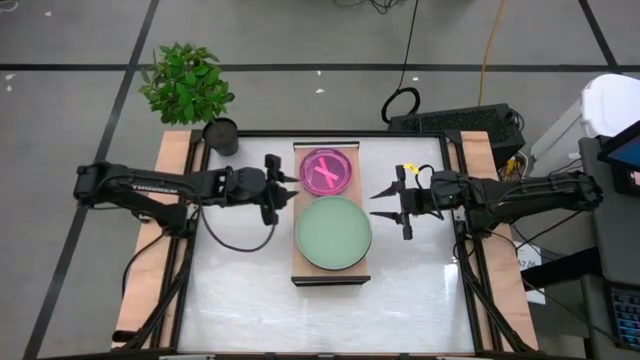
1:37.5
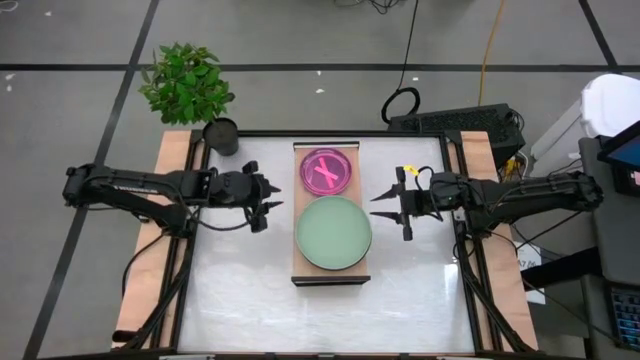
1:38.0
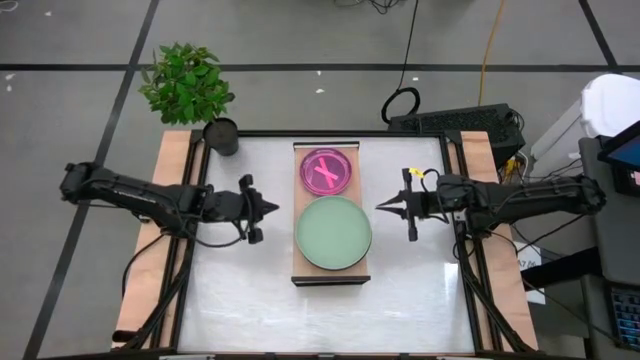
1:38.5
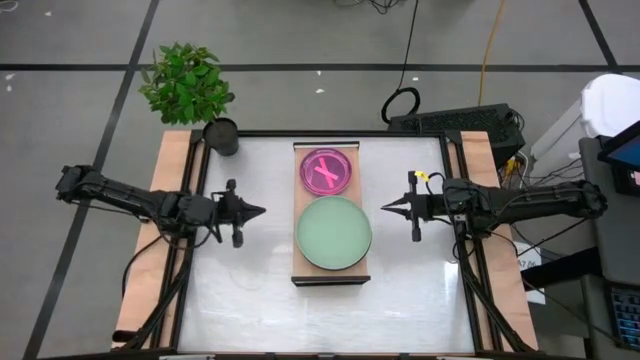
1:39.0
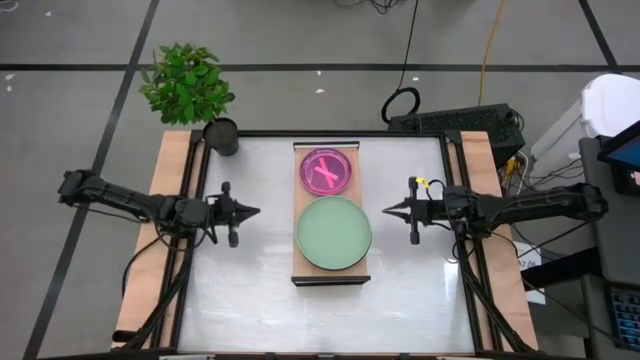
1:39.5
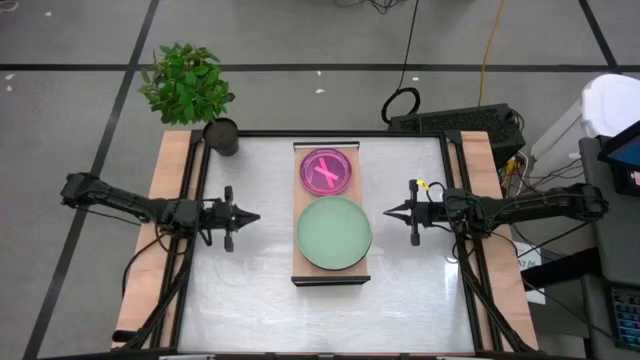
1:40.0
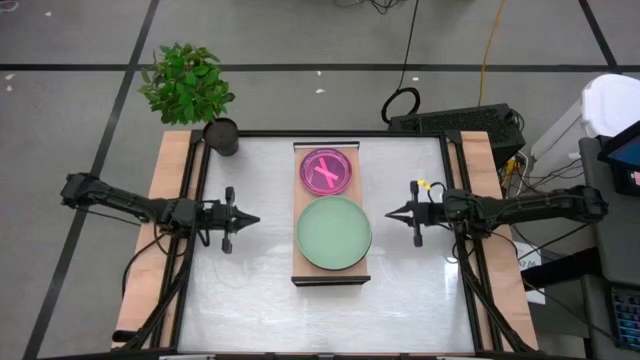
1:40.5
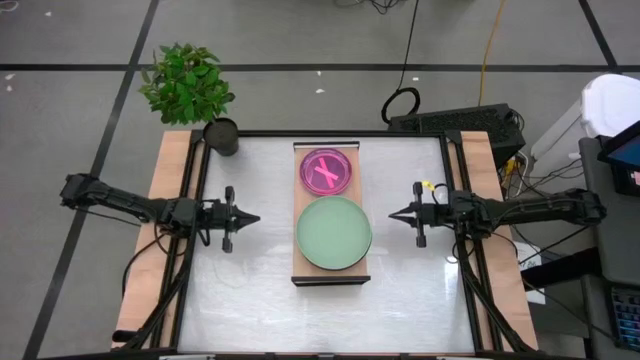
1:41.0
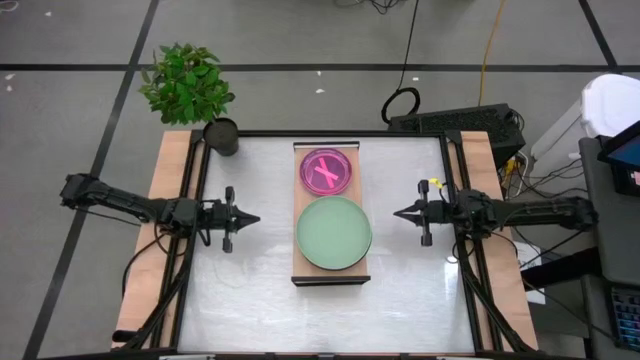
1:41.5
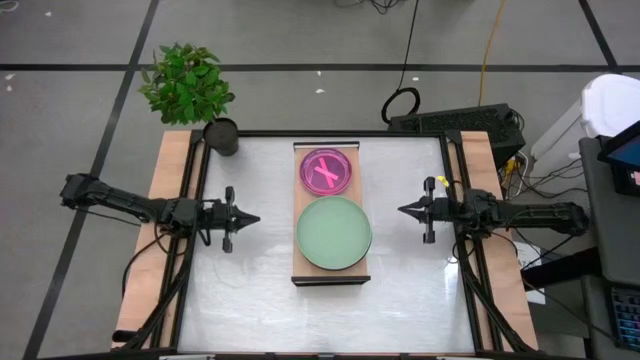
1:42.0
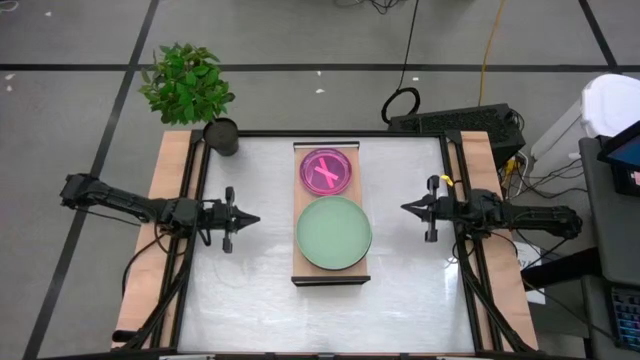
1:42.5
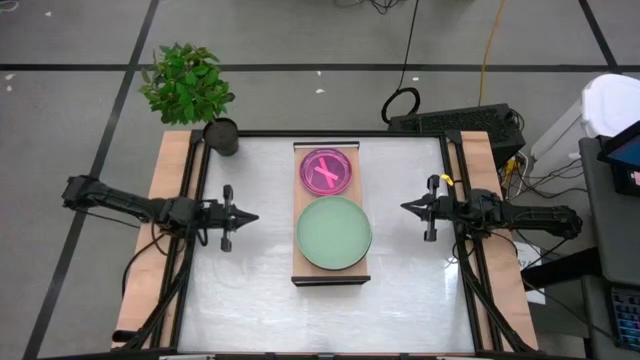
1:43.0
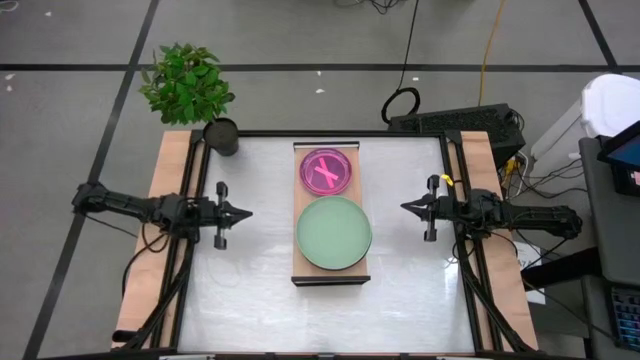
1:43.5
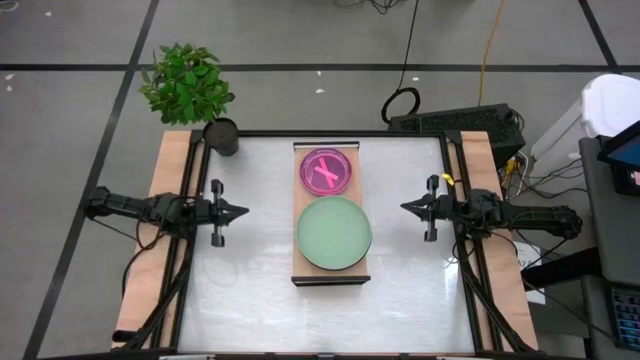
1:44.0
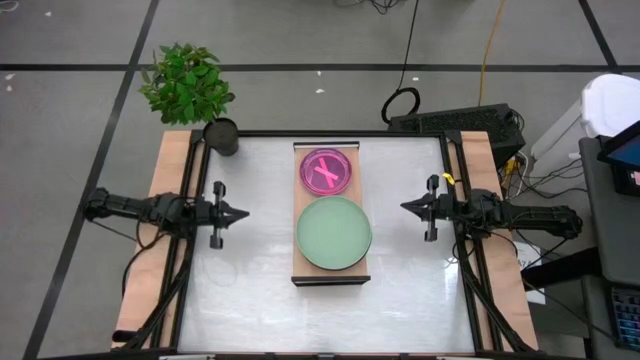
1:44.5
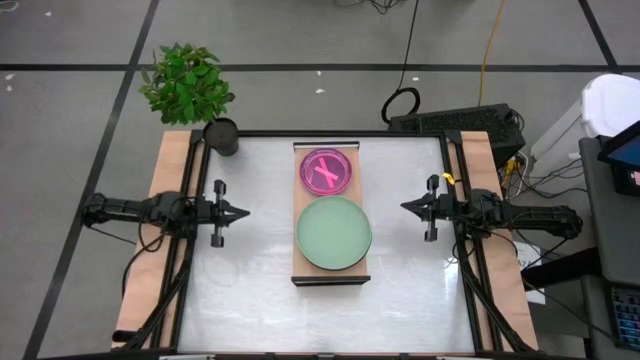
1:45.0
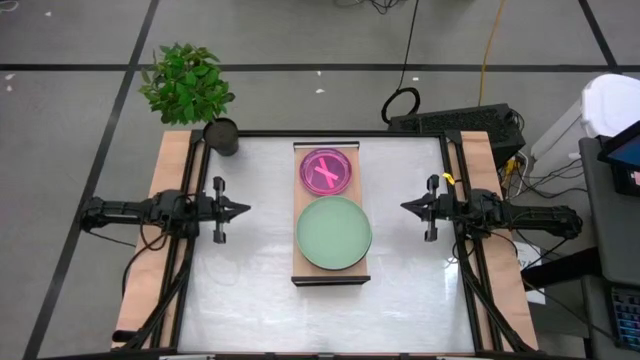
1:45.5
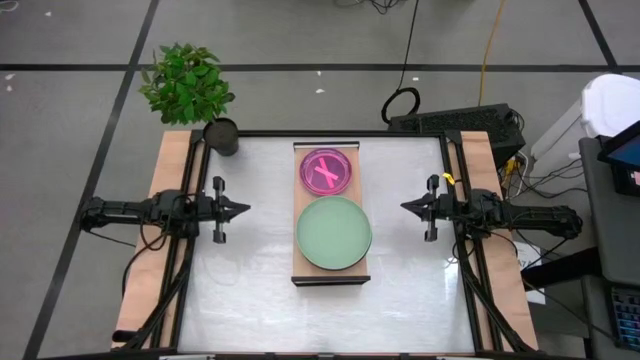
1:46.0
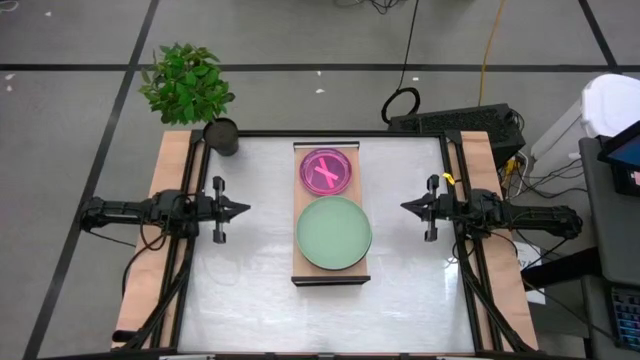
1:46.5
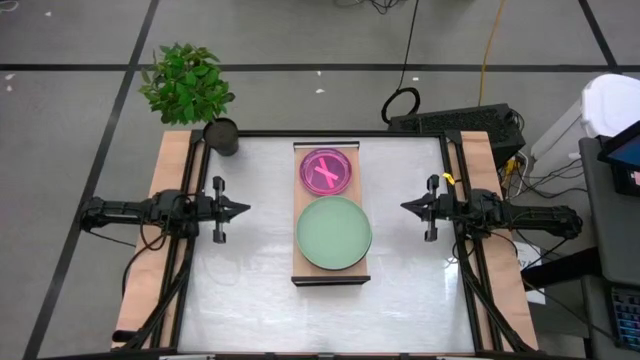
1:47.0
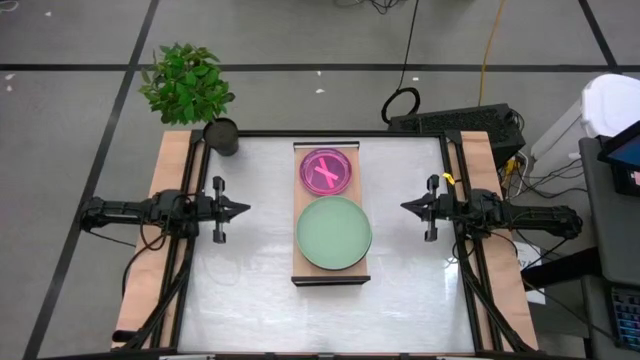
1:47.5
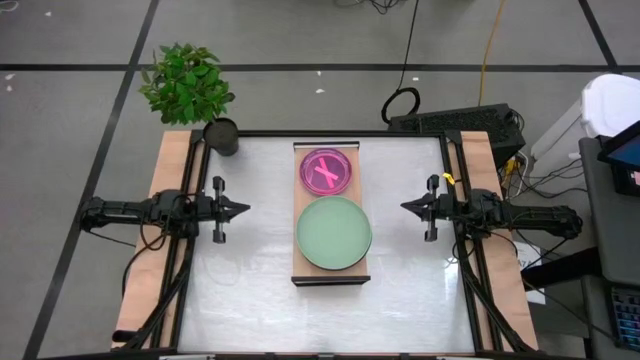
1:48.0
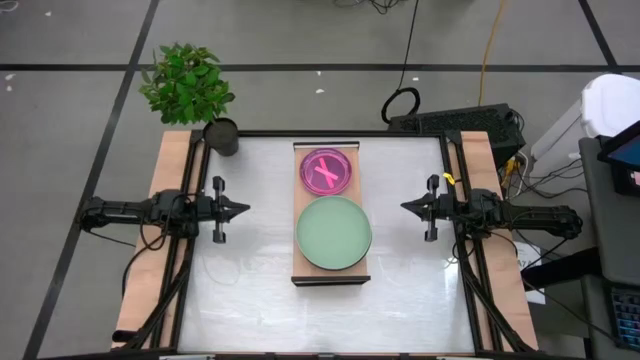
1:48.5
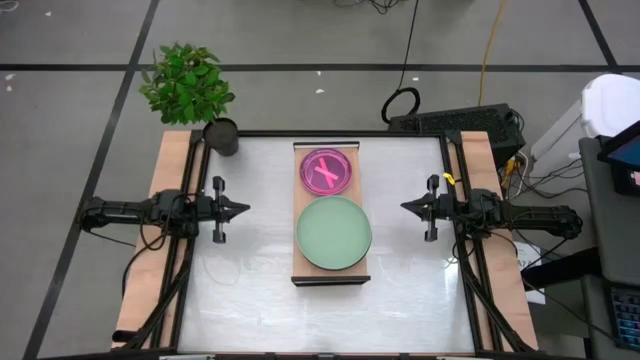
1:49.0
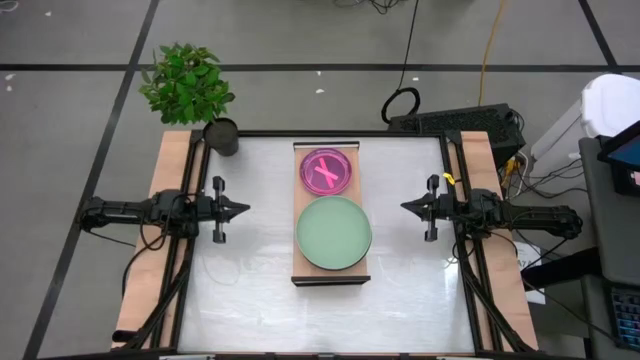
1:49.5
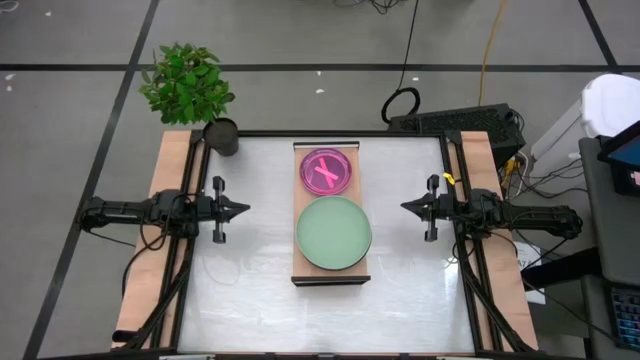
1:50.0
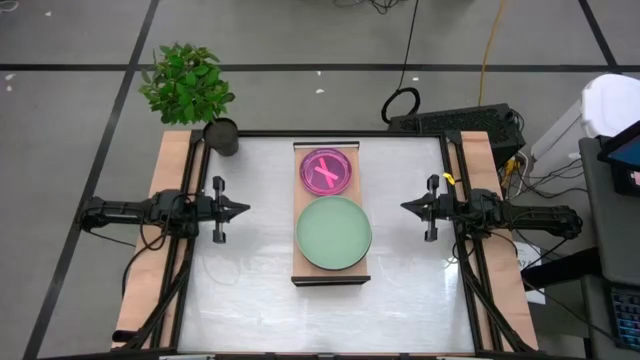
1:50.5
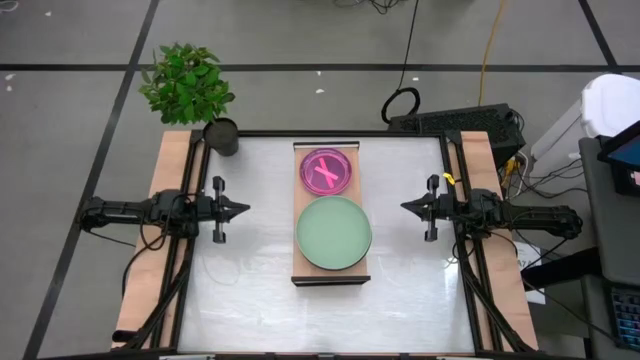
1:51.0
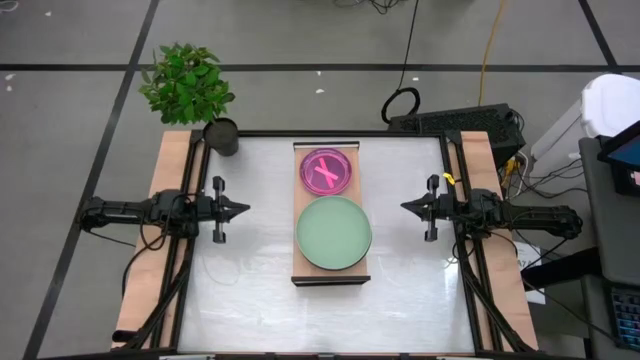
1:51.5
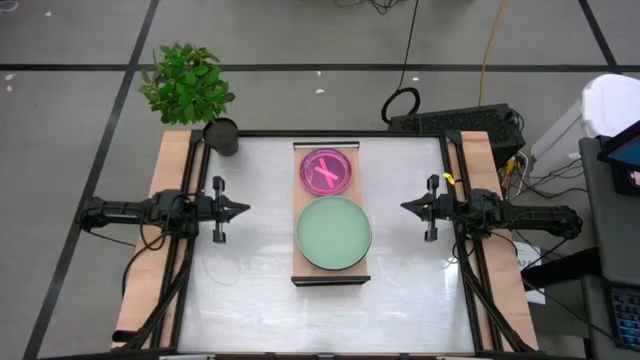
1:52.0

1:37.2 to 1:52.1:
Task: Place and stack plates onto a shelf
Return to Home Position

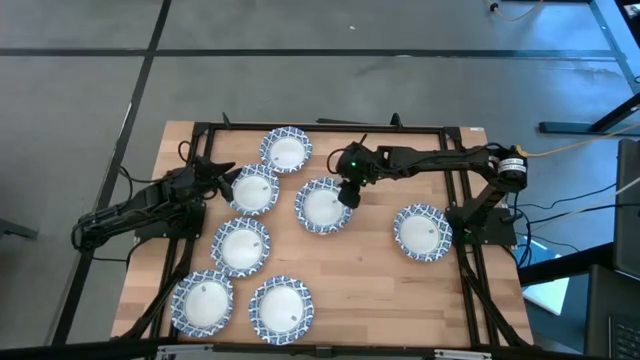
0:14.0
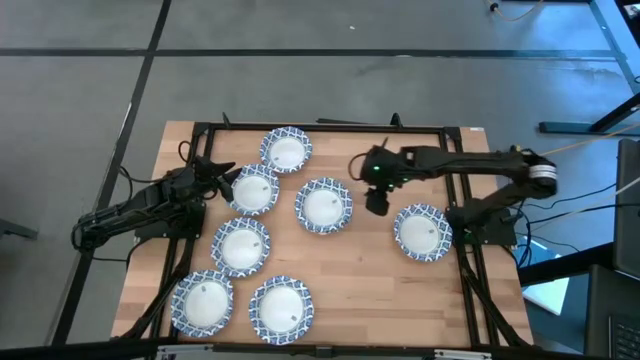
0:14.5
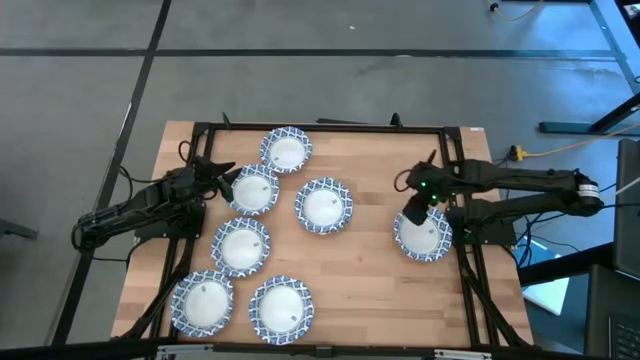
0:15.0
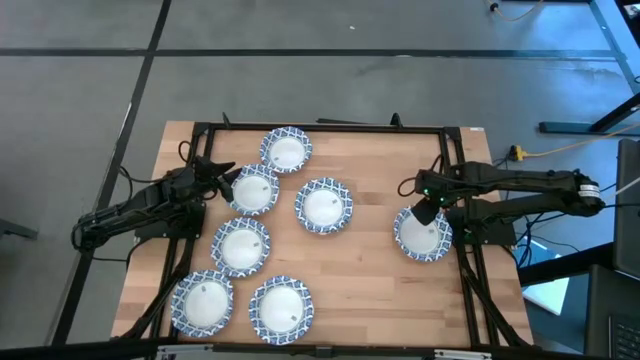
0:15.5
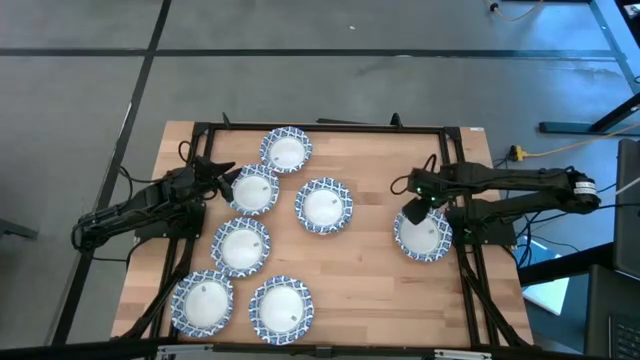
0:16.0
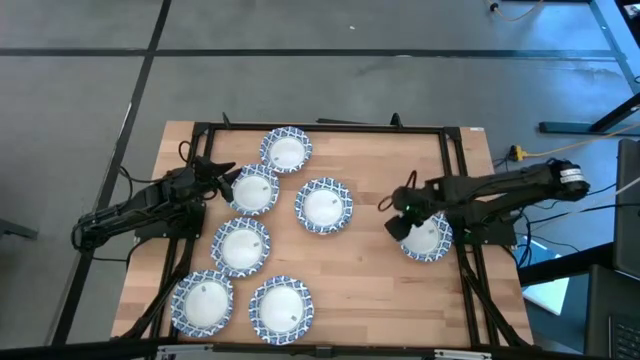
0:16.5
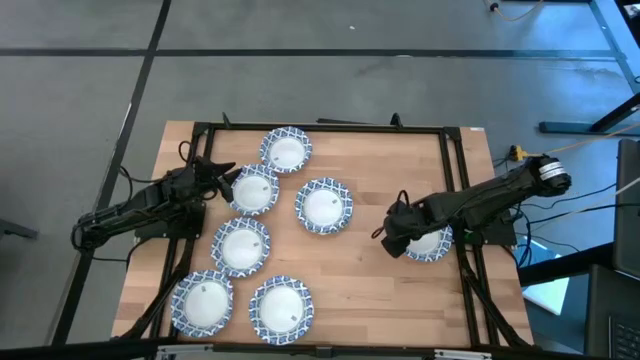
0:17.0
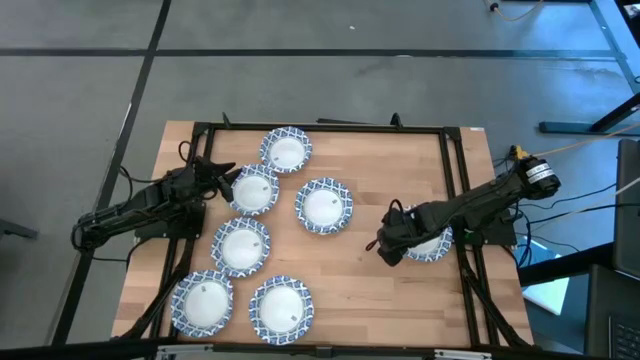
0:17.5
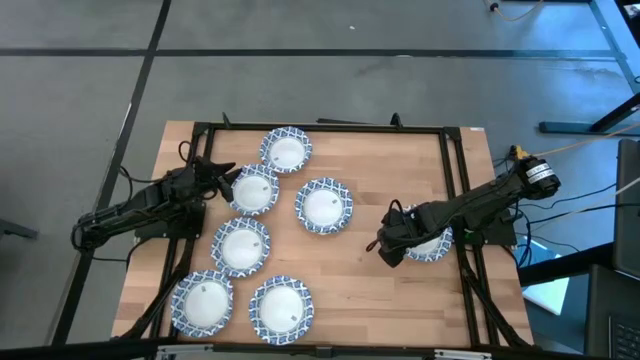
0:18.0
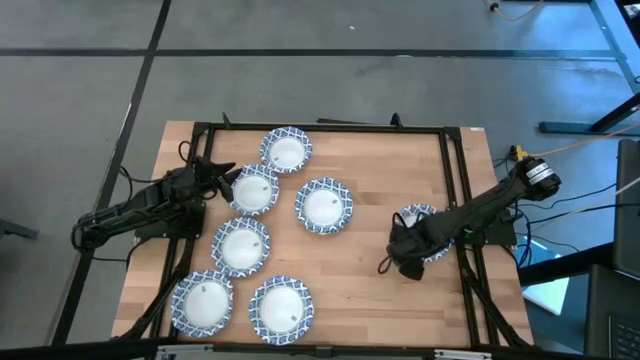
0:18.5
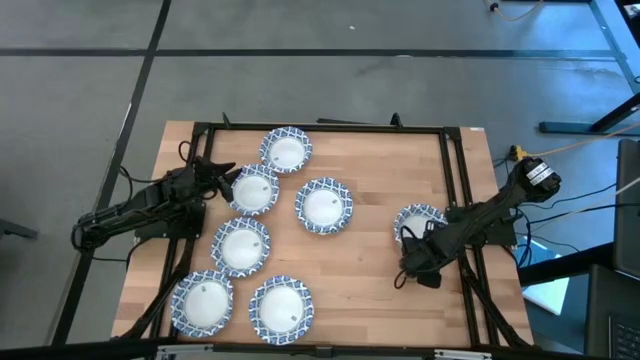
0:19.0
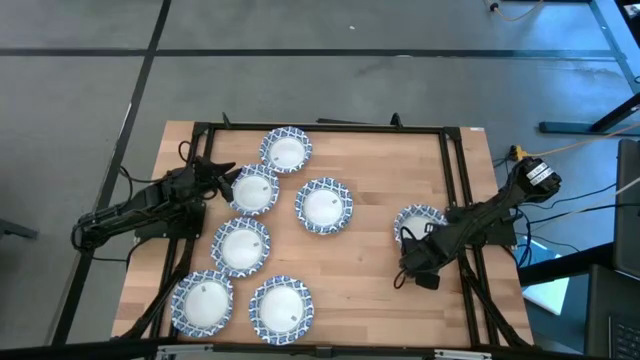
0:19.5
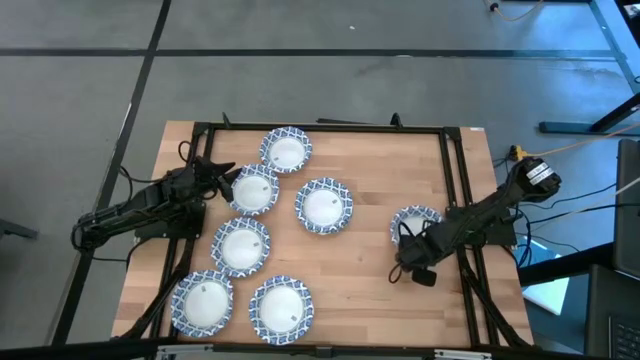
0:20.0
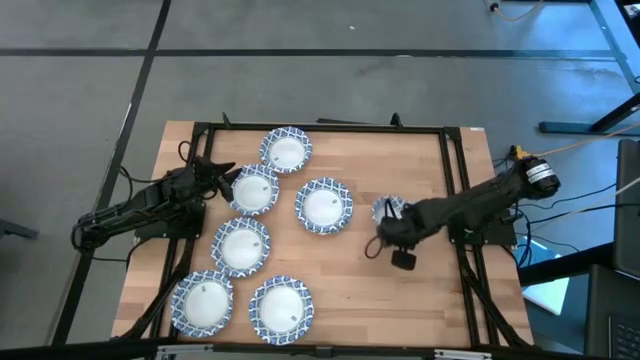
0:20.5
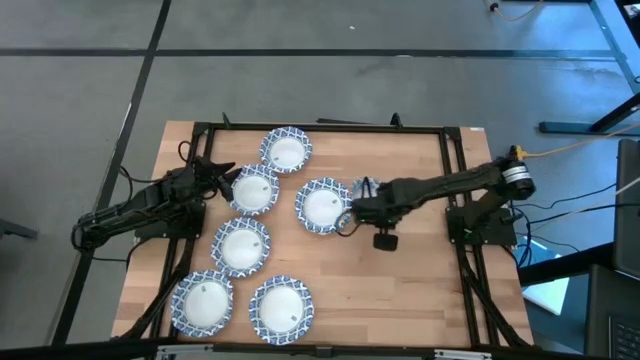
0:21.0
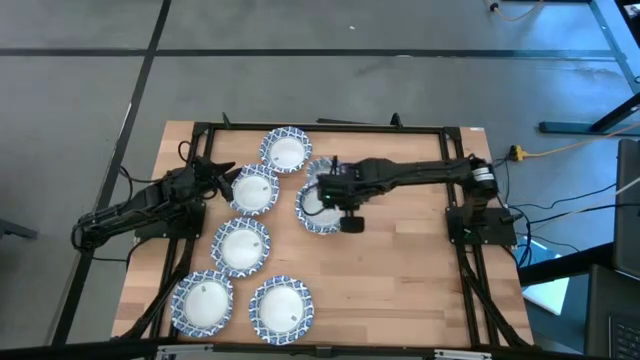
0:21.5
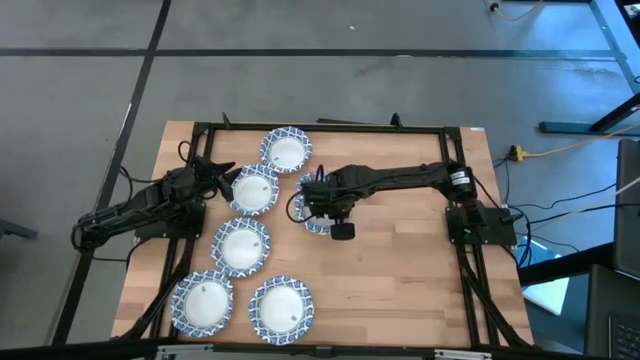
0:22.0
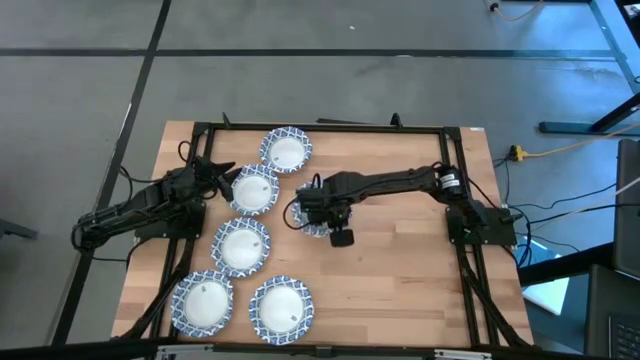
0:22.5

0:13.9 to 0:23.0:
Task: Nest bowls inside each other
Stack the white bowl on top of the other white bowls
